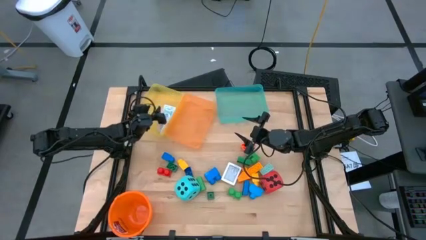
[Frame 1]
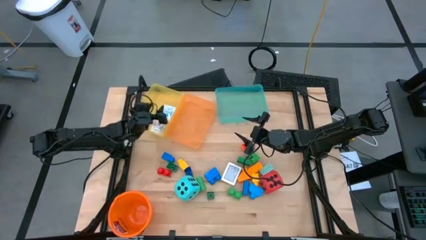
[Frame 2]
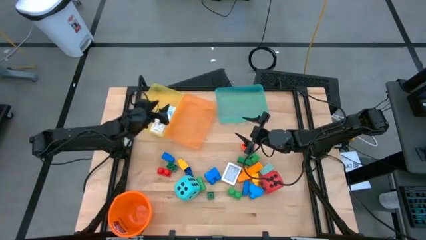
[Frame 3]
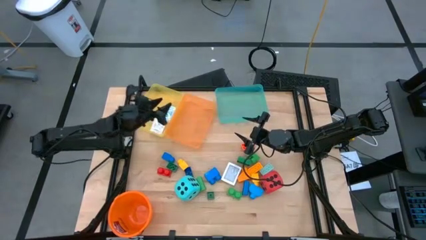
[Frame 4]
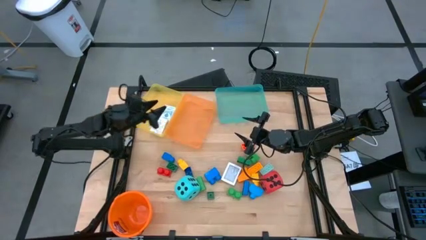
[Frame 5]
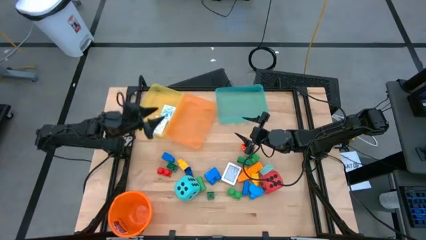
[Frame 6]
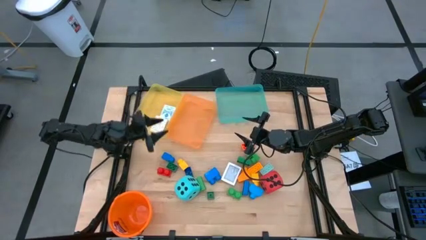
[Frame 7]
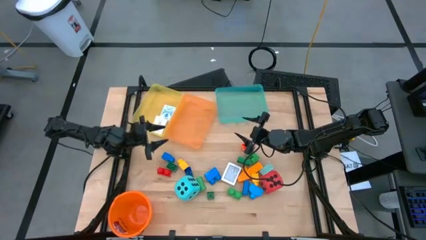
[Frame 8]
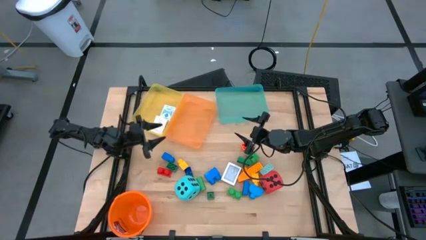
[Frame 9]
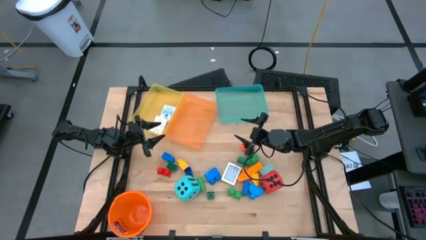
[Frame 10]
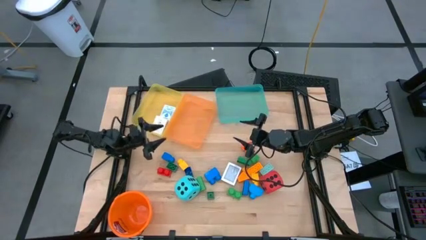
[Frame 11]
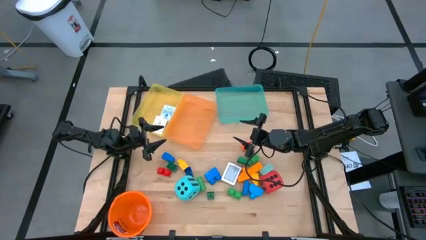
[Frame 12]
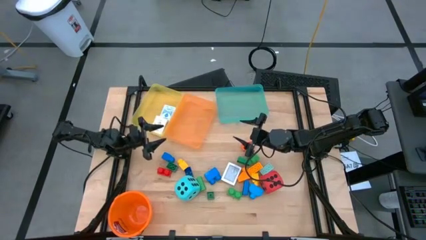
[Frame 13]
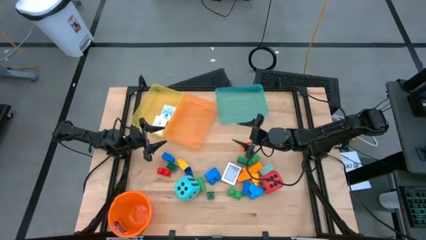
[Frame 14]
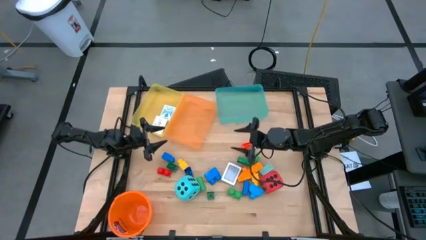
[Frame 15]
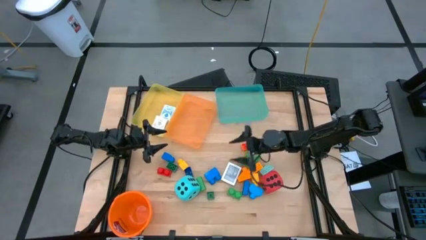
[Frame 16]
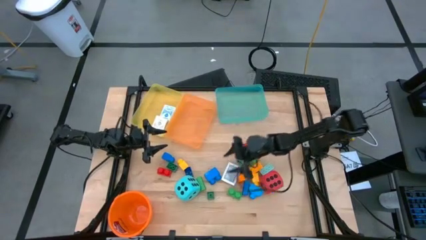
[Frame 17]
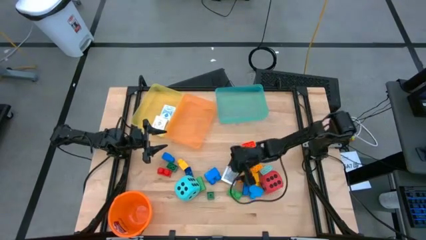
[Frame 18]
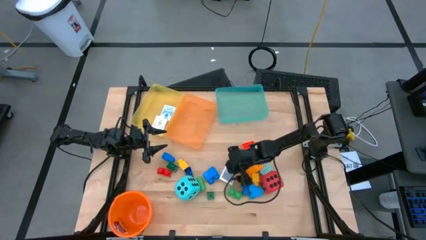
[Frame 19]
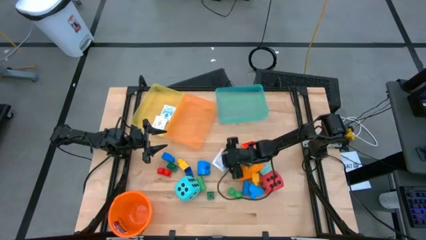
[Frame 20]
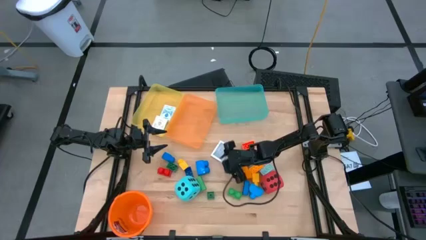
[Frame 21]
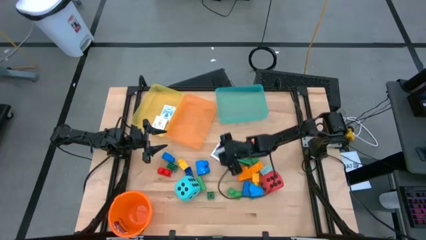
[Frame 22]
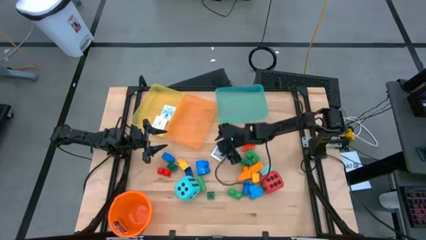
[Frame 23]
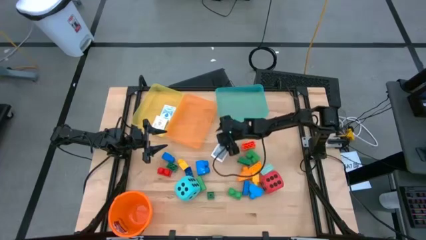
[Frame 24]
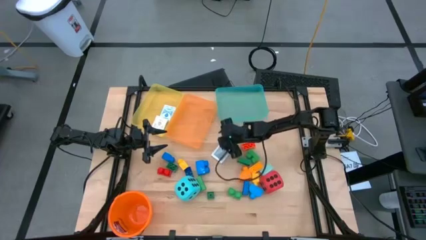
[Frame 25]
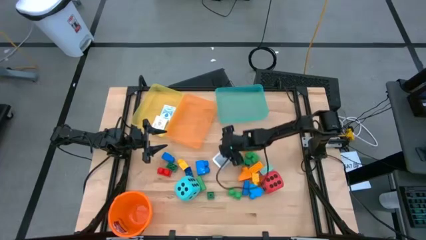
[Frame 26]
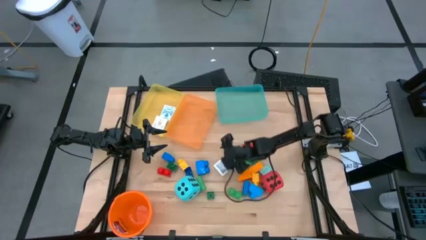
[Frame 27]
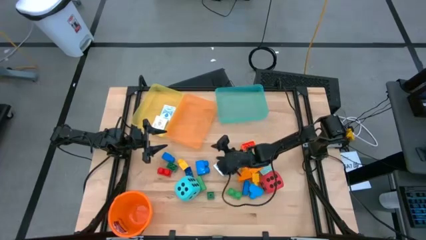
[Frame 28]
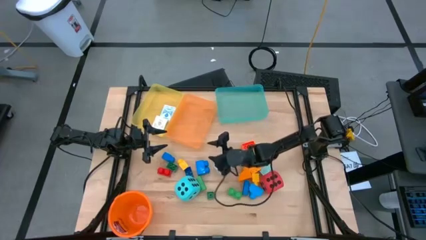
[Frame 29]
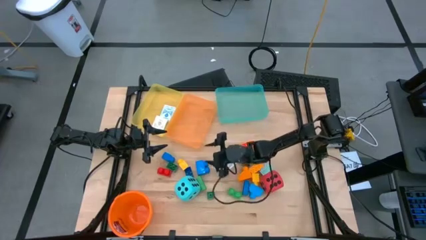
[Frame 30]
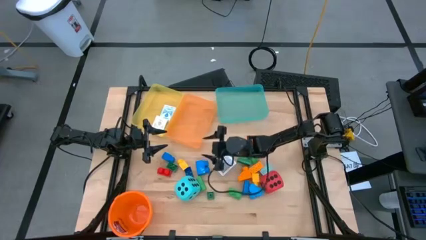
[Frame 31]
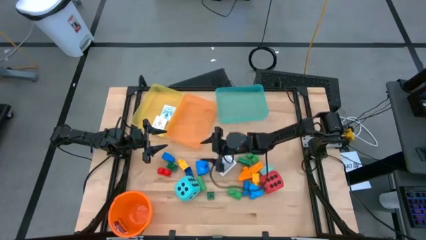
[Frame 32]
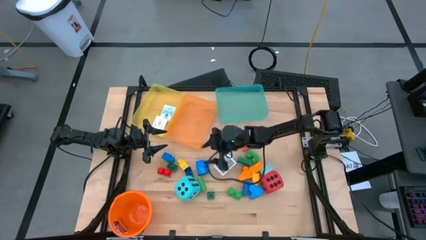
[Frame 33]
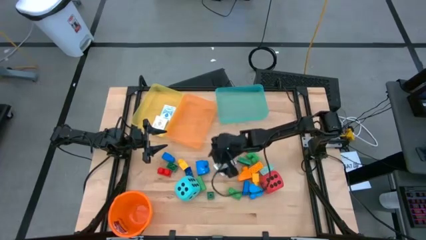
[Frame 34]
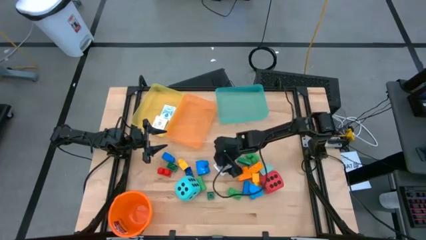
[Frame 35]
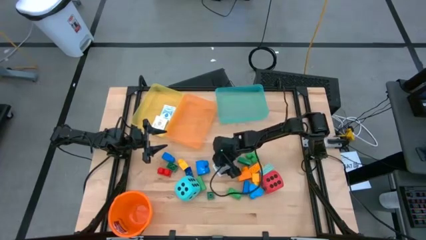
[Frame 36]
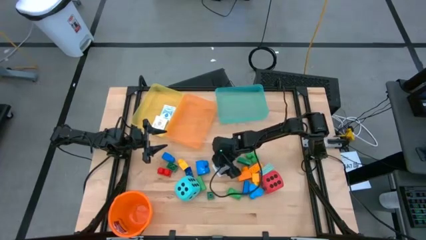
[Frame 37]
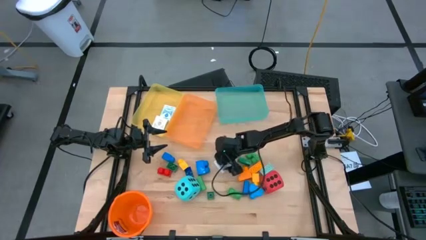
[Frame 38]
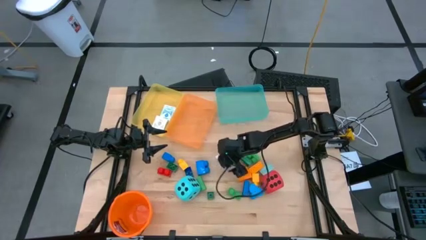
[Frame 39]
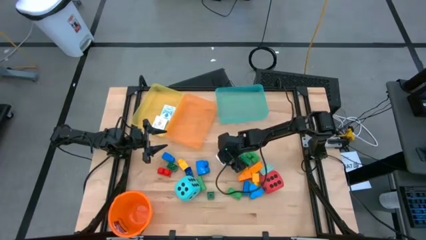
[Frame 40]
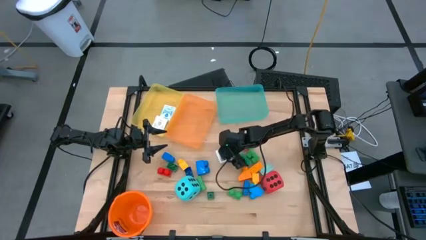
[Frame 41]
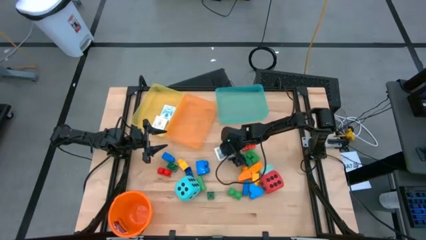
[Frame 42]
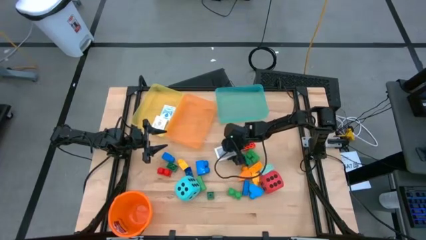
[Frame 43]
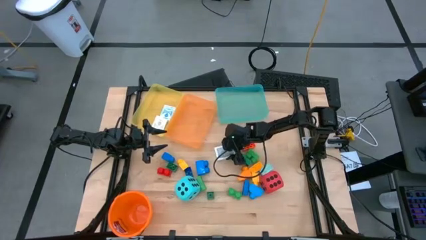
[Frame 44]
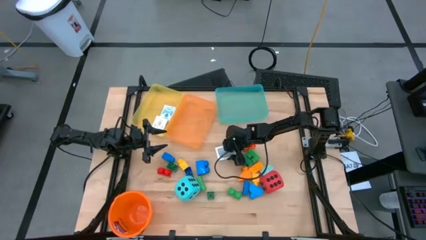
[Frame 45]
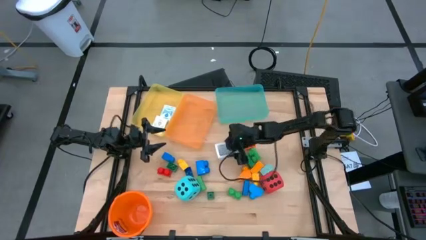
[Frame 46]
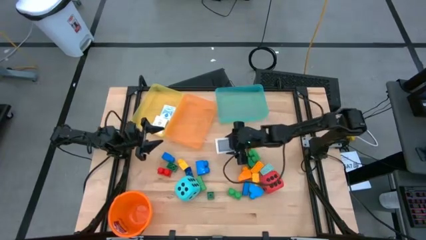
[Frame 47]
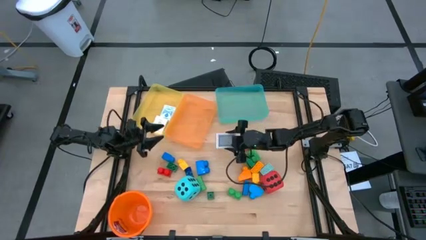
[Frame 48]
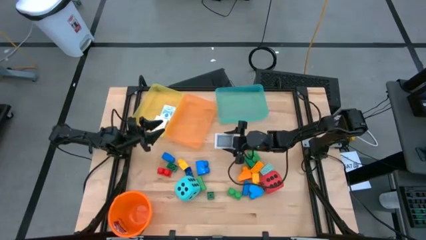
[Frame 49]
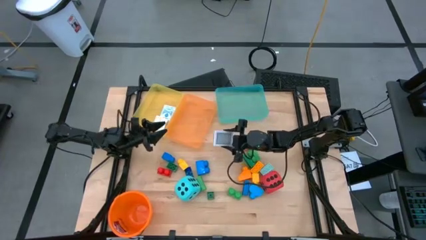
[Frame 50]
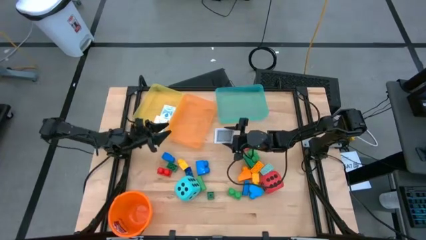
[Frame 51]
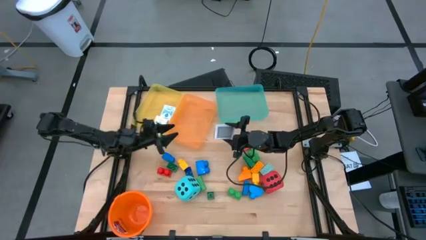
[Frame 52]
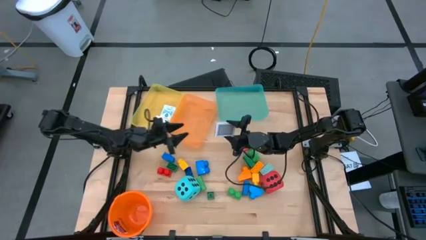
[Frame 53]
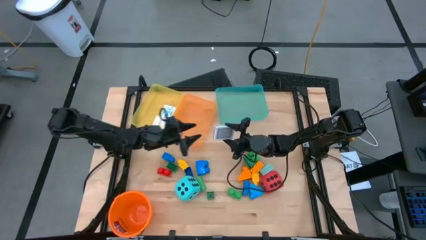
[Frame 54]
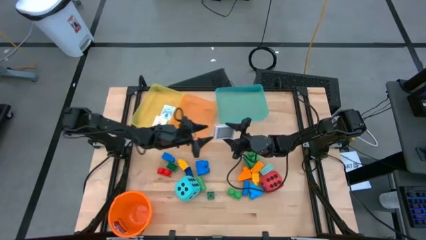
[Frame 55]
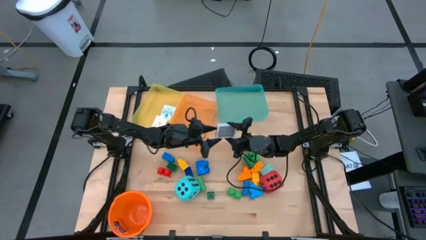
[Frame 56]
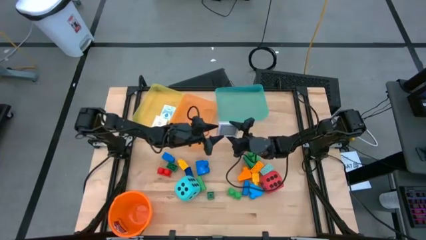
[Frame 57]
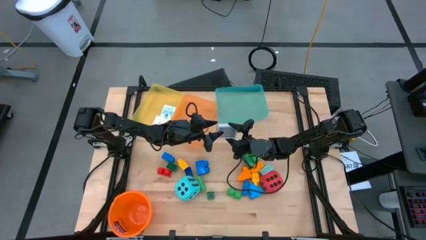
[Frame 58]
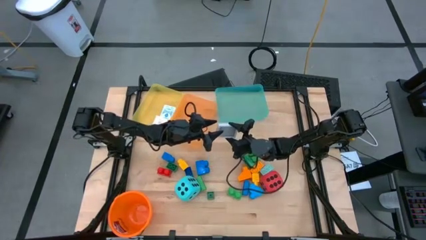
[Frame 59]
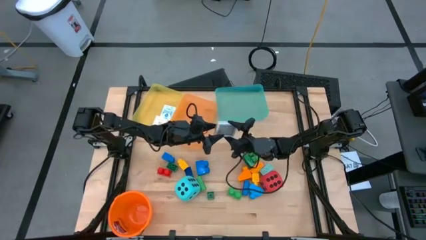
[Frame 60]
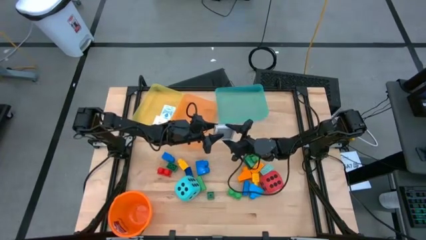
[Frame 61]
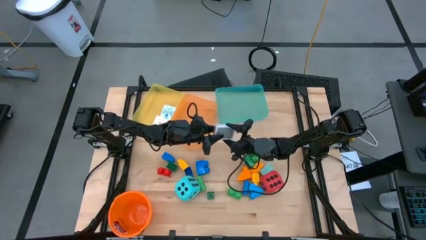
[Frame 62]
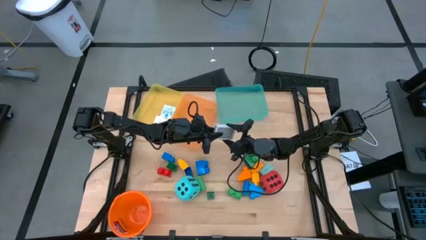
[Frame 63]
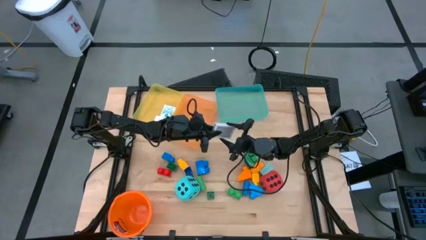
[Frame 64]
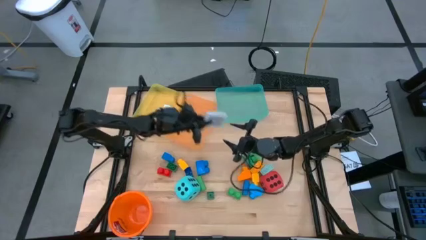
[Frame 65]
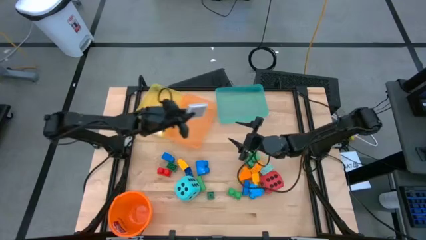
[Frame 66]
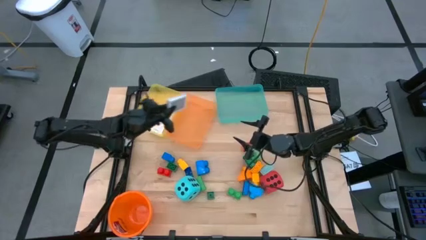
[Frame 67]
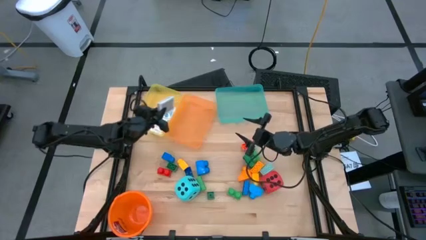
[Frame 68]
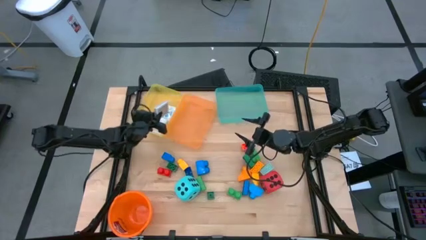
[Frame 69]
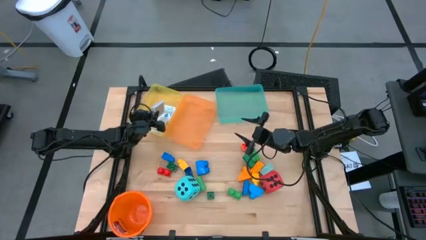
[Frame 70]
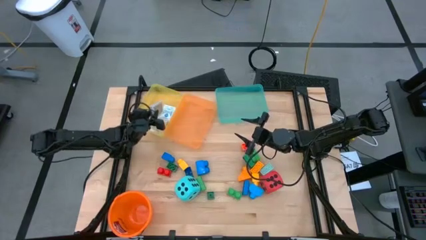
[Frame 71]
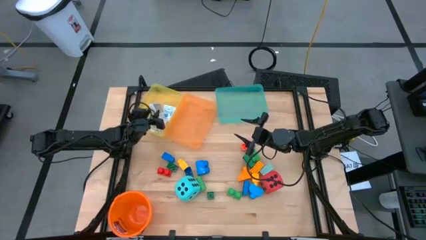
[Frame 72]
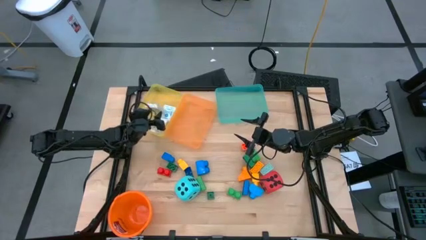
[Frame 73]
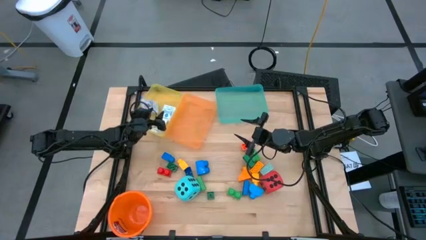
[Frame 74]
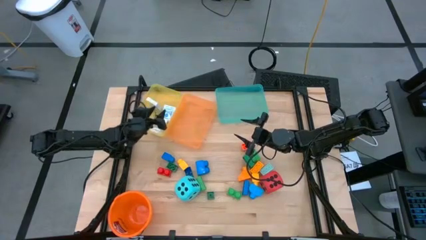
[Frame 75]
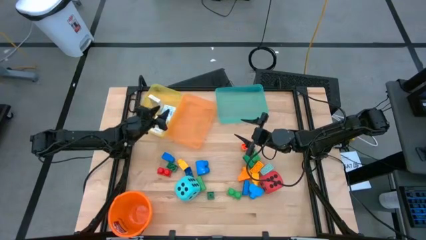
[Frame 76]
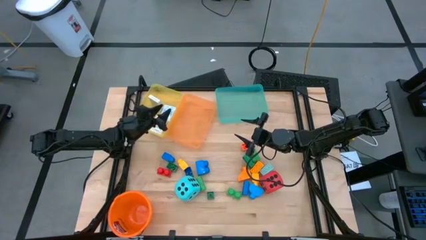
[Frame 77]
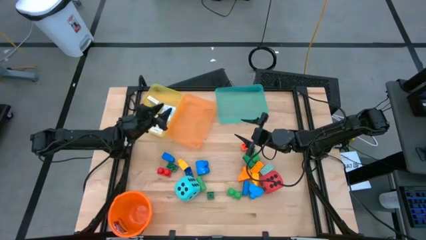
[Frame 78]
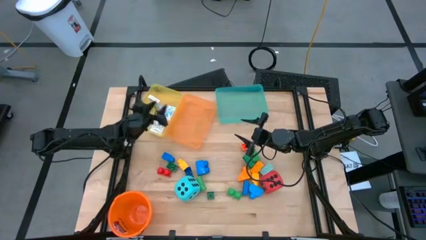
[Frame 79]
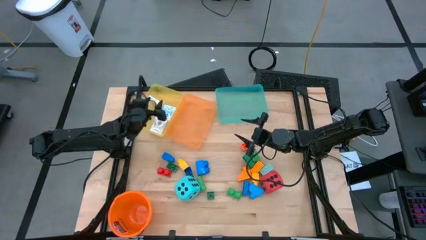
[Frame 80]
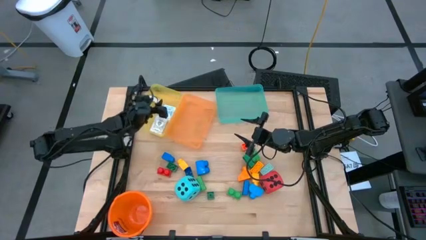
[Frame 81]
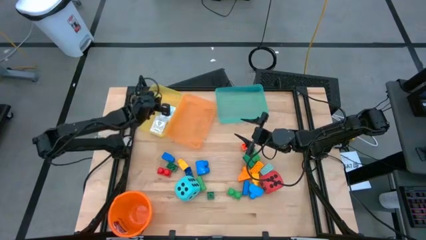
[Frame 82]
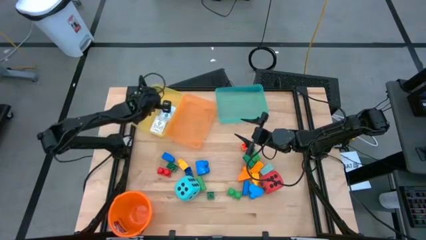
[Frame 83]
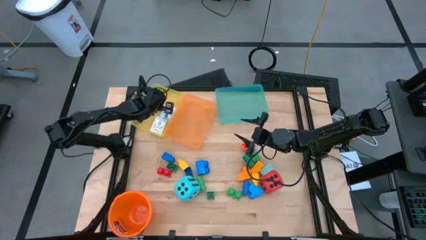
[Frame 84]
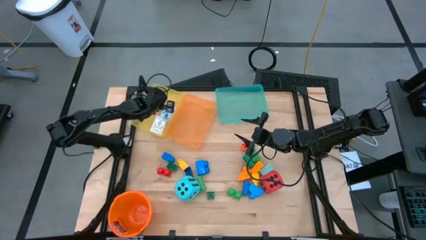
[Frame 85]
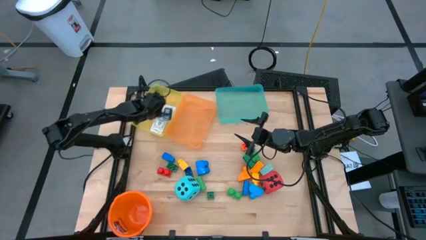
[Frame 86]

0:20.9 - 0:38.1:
Task: Pick & Place Toys
Put the gray deck of cards into the yellow bin
